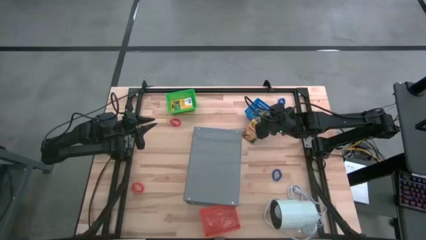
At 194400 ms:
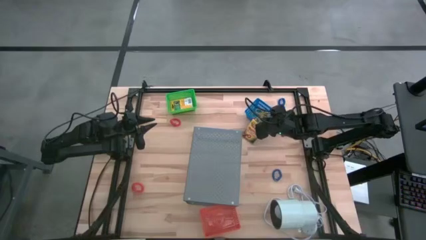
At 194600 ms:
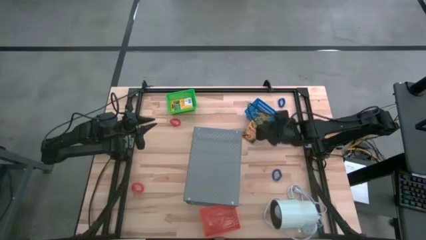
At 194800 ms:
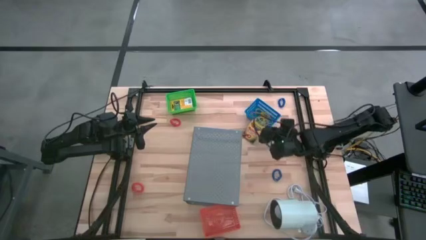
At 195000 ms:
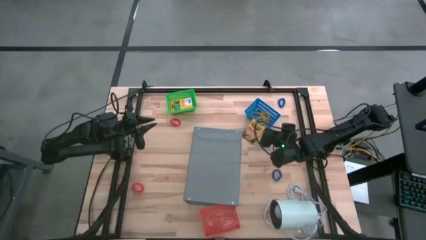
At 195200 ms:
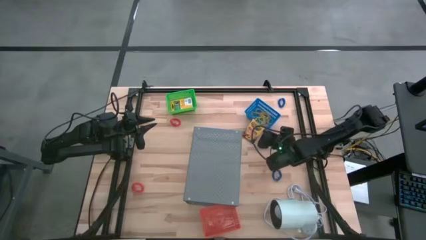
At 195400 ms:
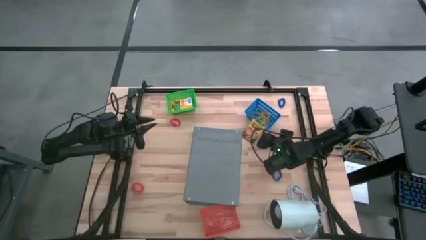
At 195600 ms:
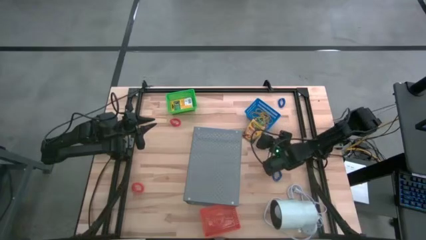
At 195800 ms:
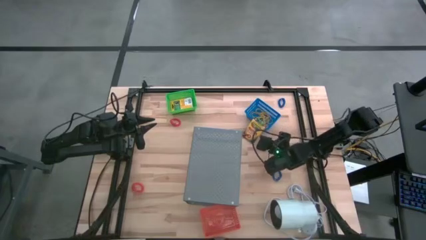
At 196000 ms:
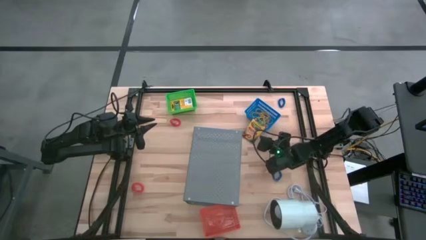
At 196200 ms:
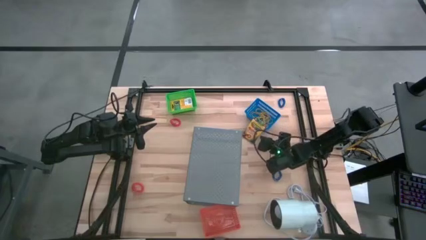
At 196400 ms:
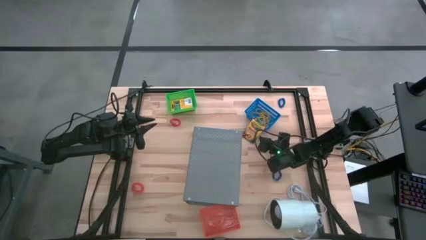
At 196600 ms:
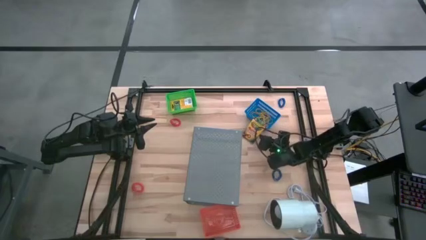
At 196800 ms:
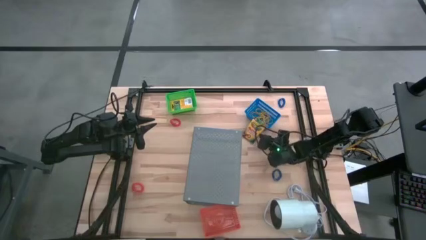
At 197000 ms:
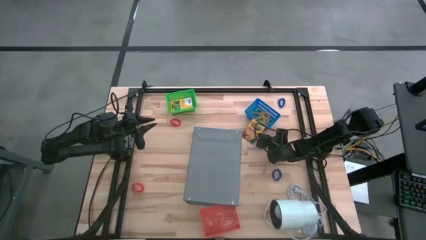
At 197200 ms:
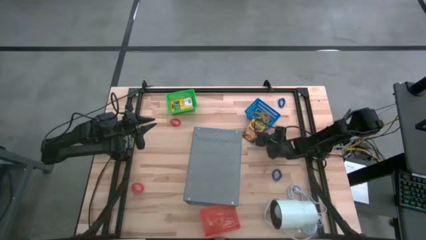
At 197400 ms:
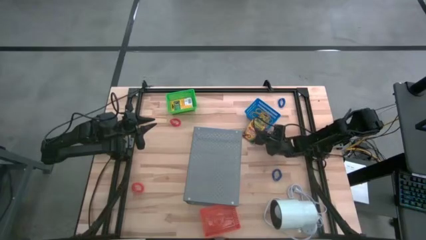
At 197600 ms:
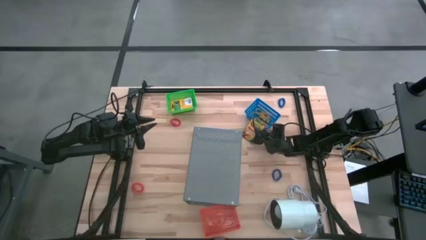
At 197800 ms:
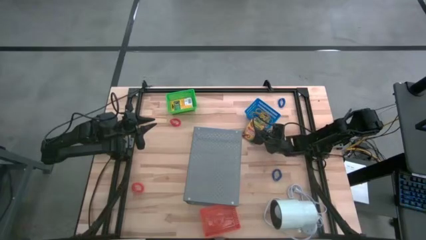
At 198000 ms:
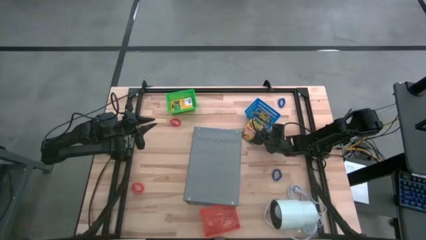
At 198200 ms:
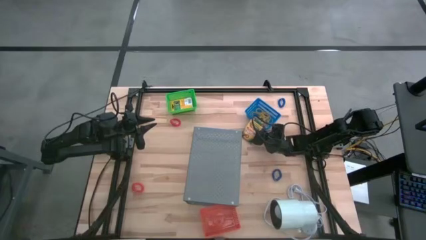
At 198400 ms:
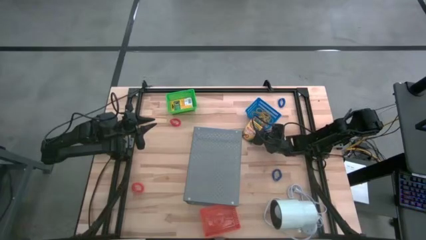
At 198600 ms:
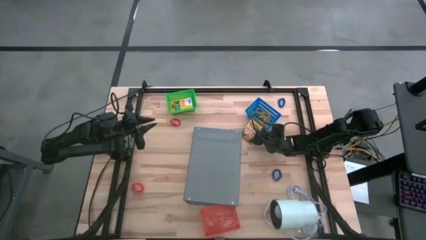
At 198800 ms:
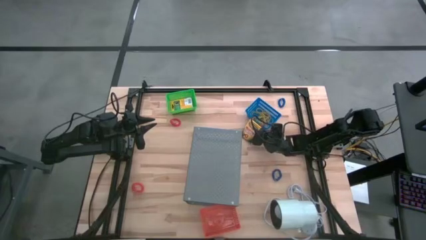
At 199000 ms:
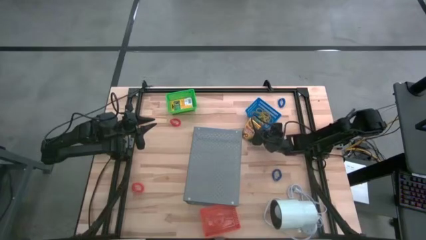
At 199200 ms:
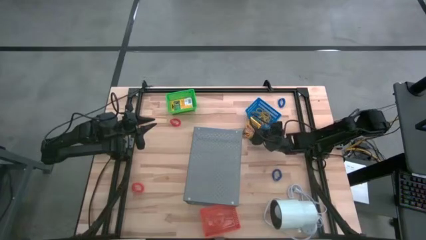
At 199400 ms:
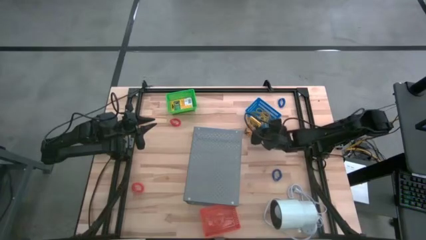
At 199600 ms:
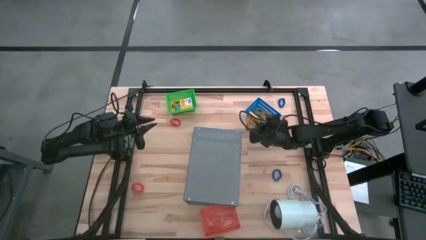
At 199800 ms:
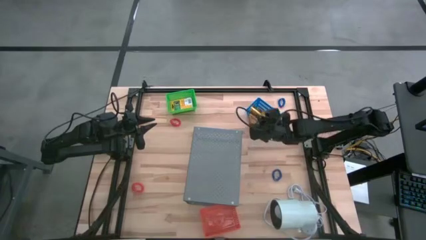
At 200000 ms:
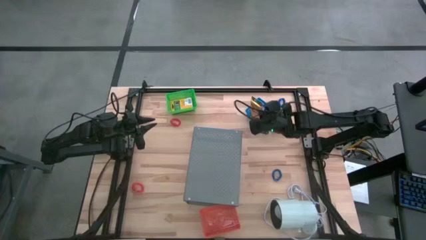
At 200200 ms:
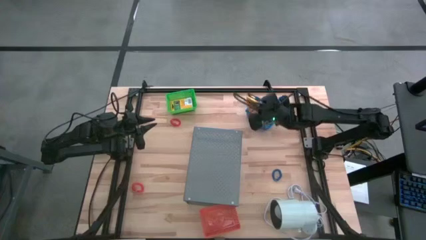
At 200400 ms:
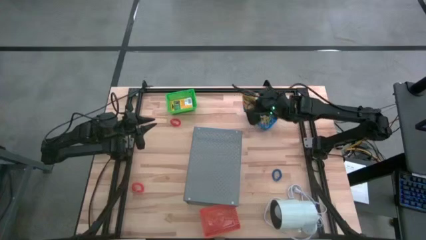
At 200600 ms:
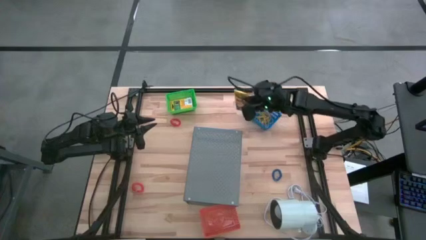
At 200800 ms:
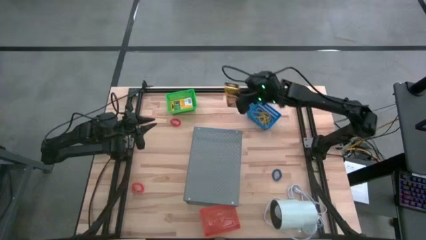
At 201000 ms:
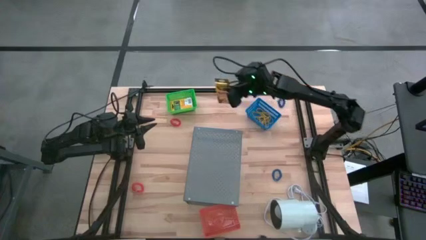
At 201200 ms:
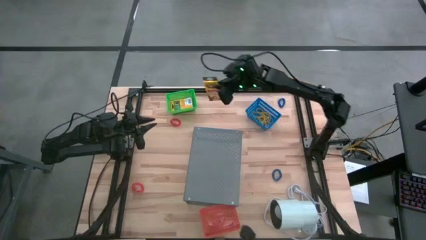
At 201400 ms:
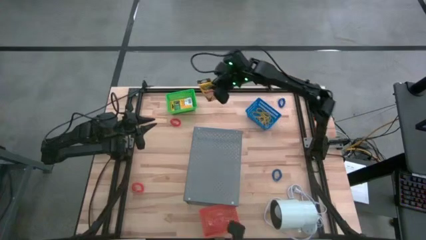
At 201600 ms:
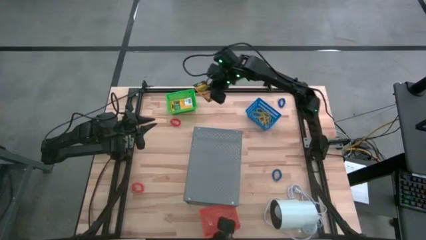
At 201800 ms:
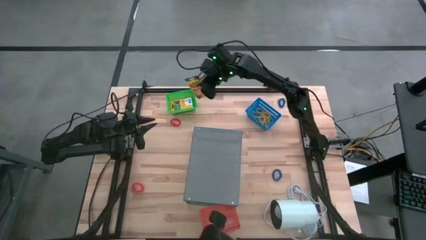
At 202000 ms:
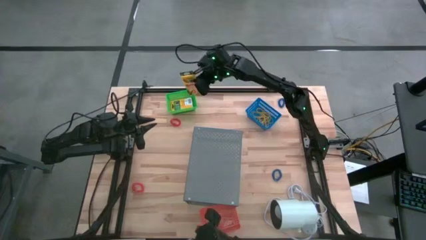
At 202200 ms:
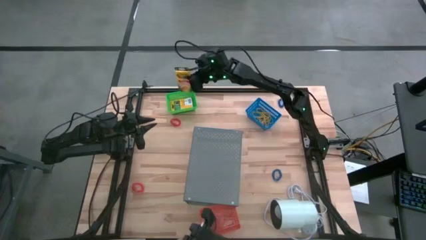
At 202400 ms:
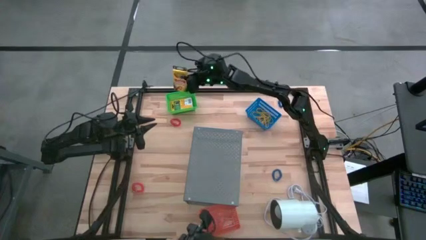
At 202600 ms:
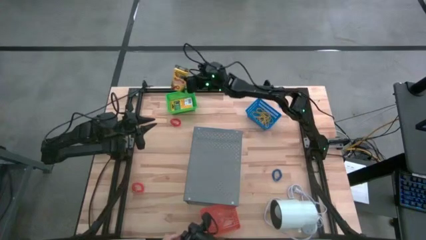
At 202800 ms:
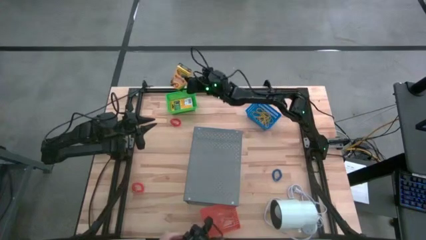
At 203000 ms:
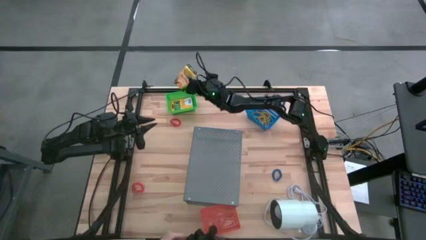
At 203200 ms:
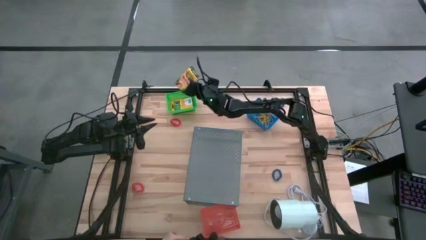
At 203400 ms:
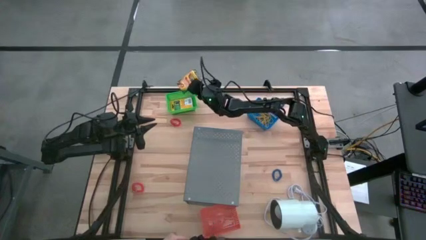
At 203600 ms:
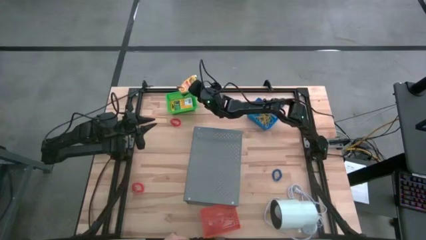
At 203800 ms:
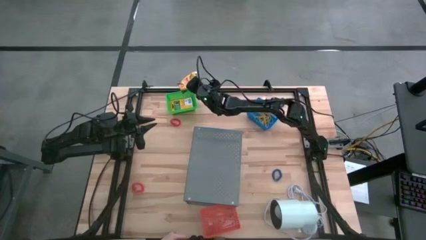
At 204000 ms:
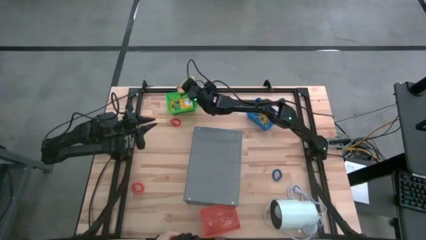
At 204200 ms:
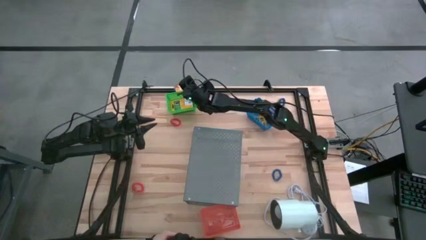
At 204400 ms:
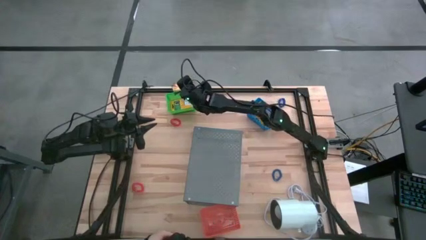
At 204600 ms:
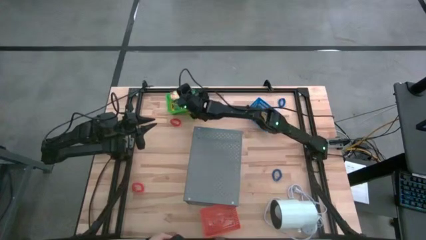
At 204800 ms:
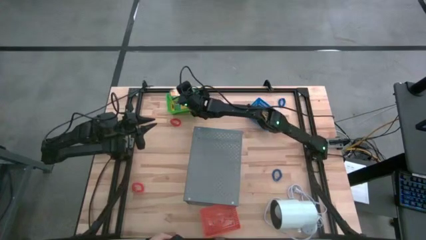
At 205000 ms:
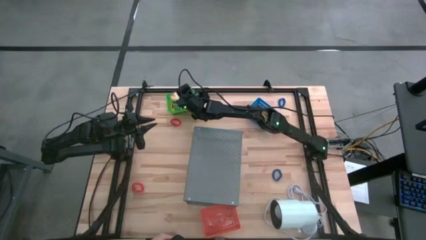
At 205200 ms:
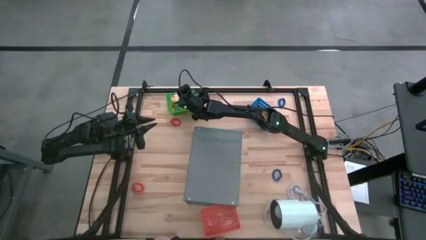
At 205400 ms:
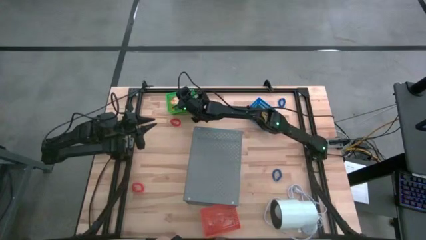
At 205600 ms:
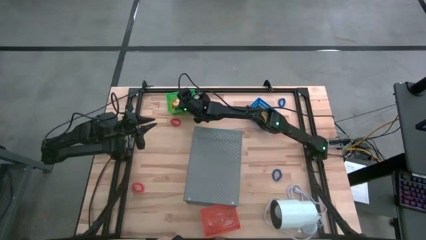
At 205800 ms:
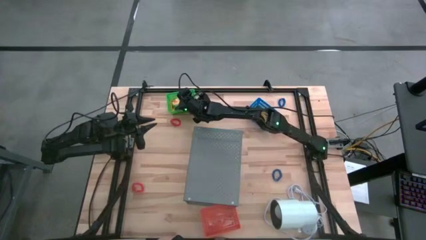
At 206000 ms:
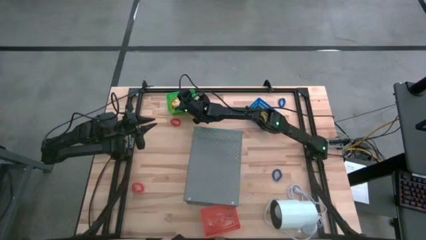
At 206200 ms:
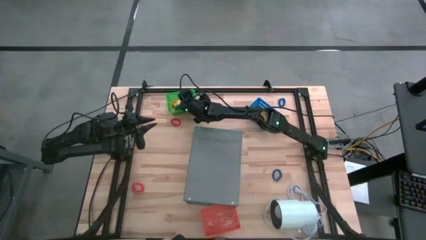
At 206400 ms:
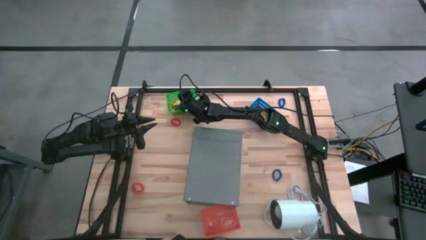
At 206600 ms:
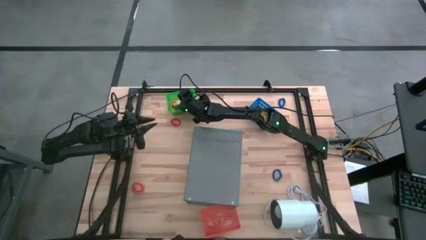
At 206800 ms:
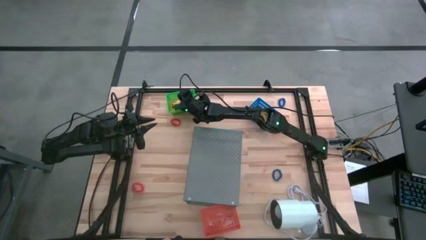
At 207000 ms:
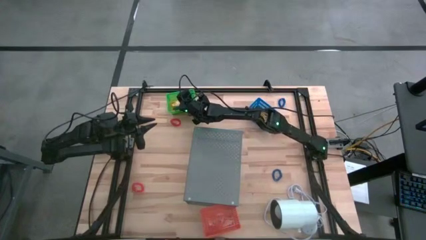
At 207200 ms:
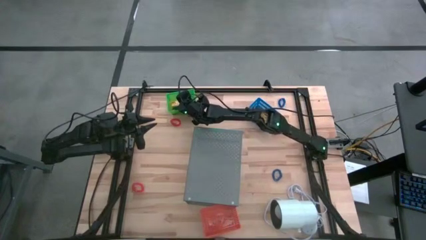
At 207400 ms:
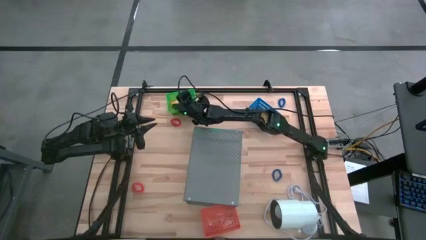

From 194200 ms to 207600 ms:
Task: Pick & Place Office Desk Supplies
Put the yellow crayon box into the green basket

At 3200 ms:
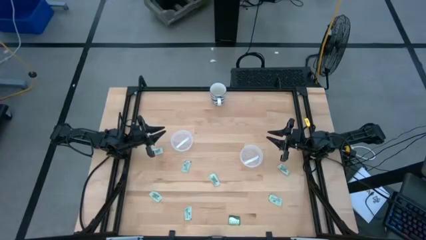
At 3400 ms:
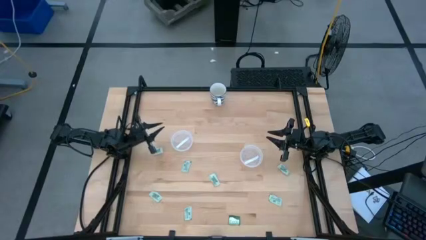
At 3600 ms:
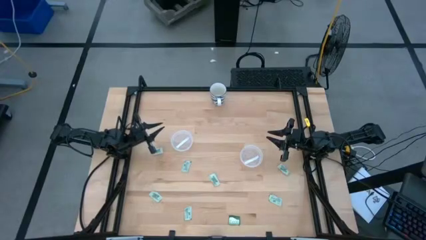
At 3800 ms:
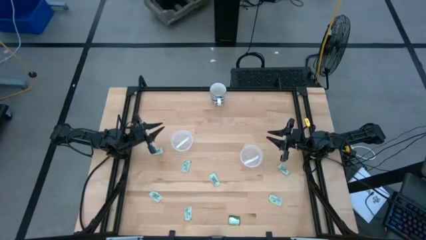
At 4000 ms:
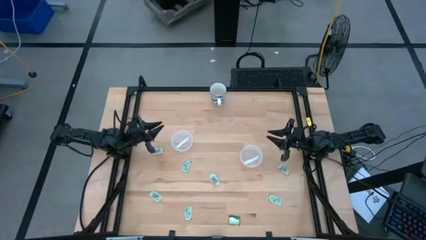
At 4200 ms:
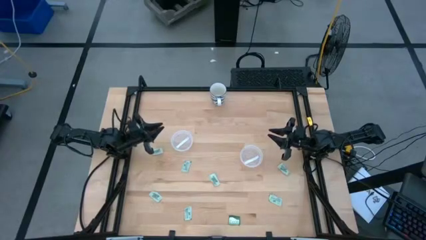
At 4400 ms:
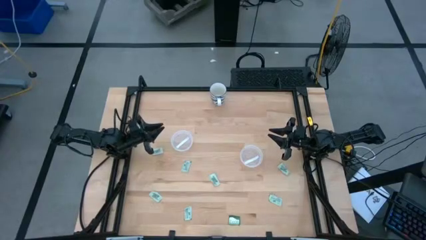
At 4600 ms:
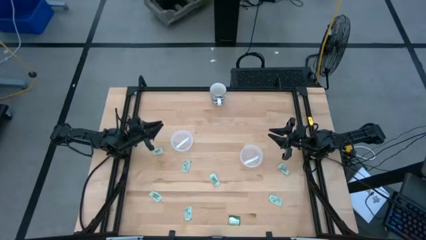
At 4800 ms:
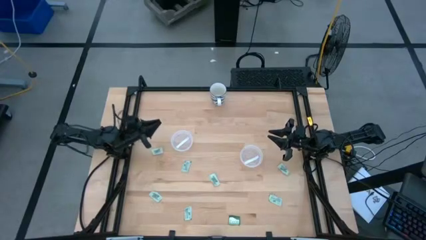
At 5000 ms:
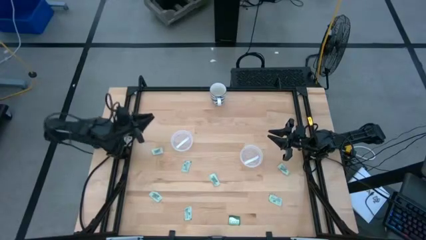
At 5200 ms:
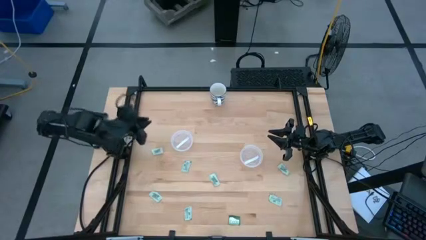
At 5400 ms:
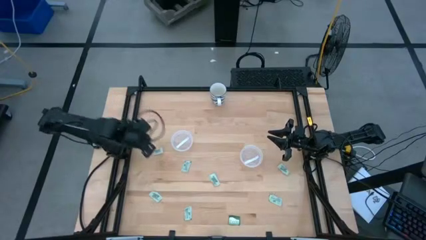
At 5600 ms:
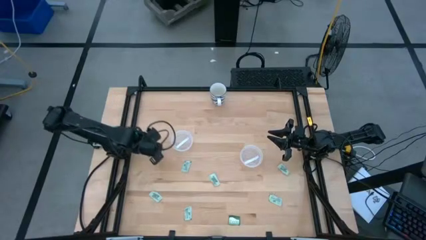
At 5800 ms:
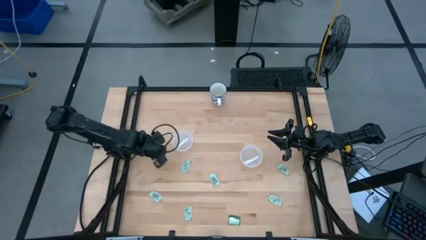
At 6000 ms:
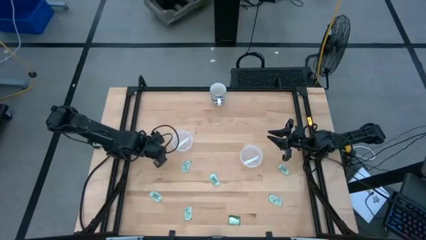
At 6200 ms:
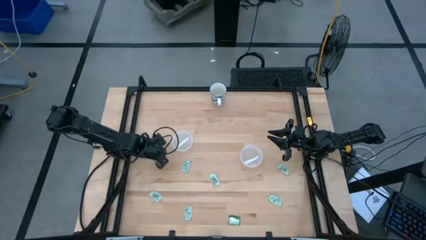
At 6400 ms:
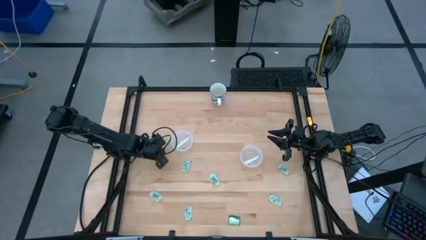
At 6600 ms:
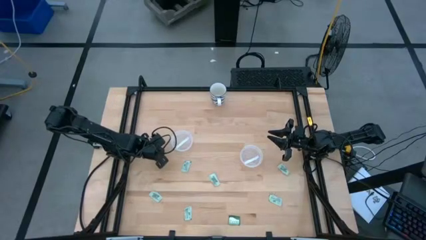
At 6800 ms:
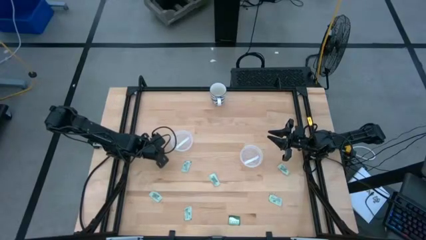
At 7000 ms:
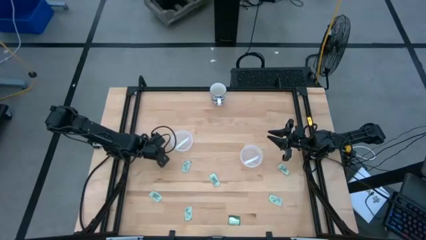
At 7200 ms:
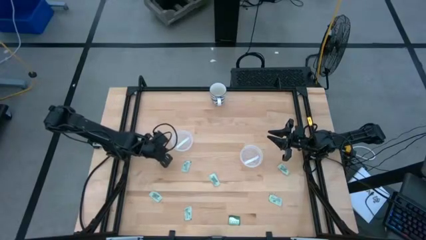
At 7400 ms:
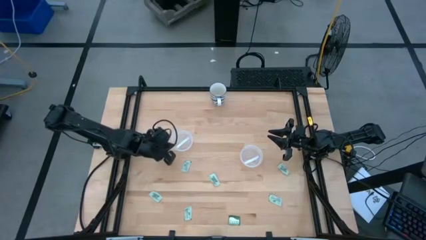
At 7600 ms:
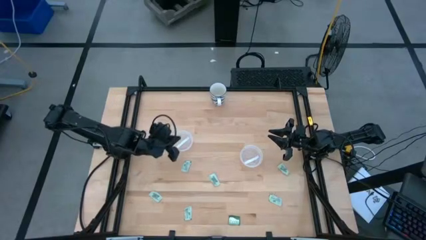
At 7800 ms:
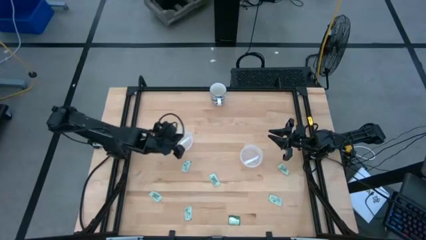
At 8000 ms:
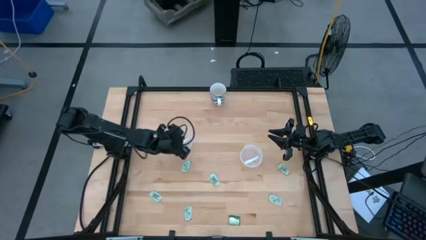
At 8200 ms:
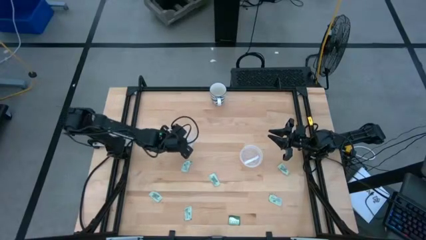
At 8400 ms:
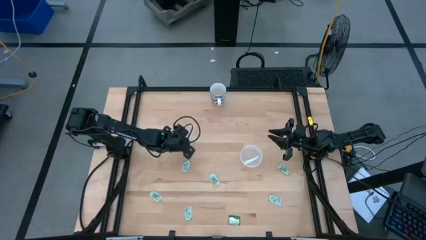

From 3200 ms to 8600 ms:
Task: Pick and place Stevia / Truvia into bins
Put the light green stevia packet into the left transparent container
